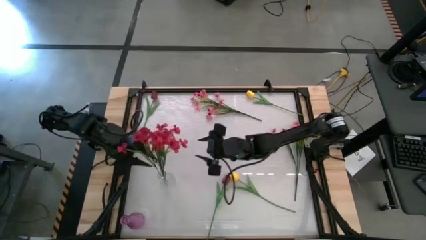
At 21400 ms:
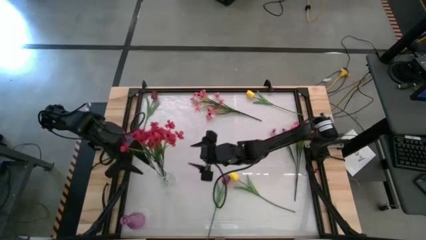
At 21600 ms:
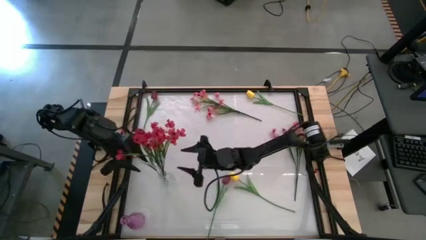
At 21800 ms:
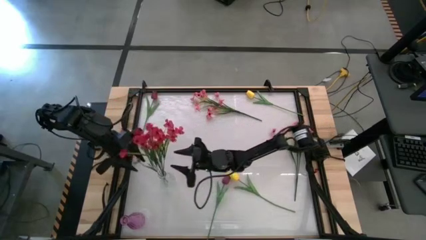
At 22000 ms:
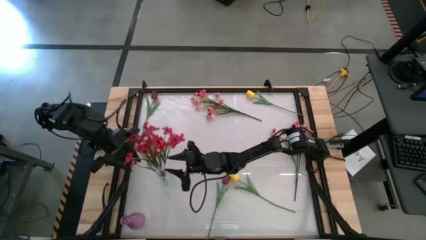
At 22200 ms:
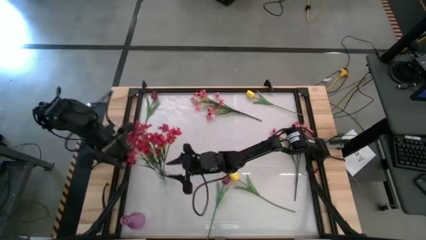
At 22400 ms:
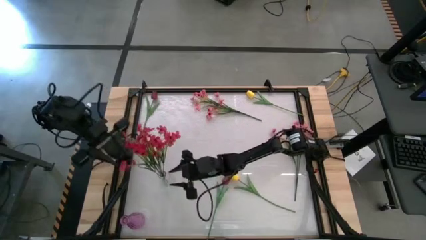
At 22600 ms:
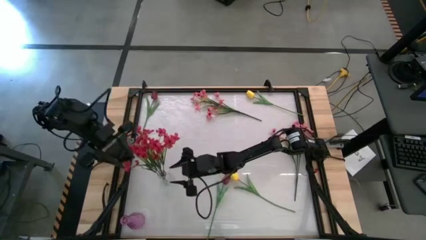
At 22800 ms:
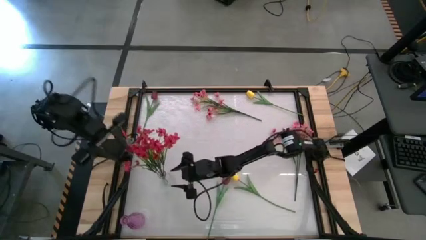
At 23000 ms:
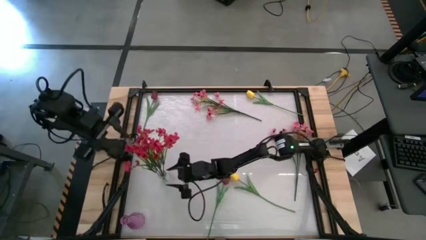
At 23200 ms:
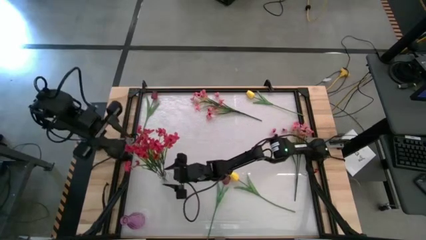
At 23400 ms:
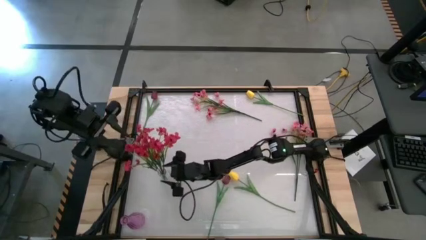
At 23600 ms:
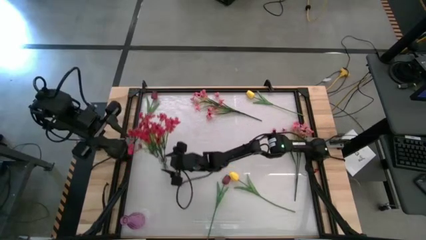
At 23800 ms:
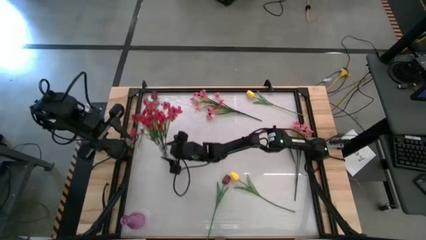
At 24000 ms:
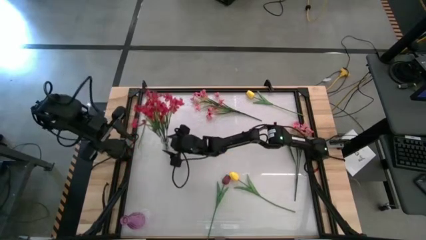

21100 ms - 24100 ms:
Task: Sort flowers into vase by color
Move the transparent vase to the middle left of the table

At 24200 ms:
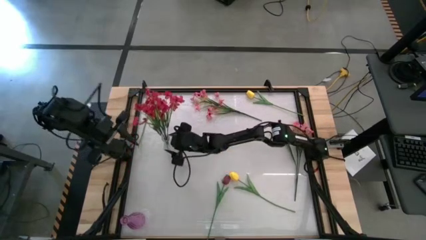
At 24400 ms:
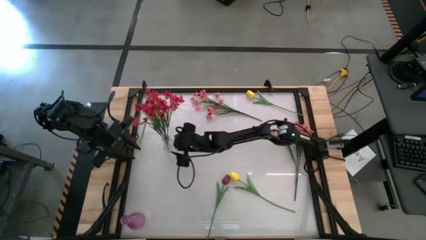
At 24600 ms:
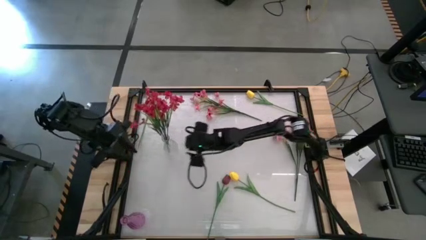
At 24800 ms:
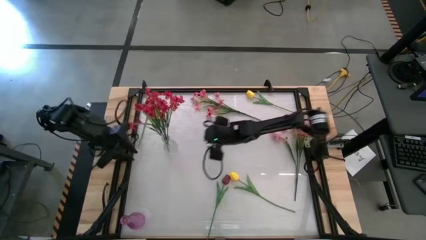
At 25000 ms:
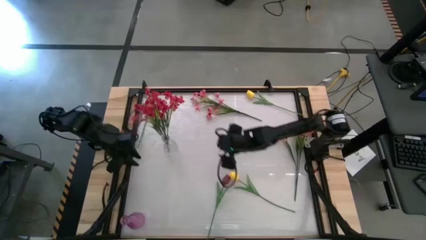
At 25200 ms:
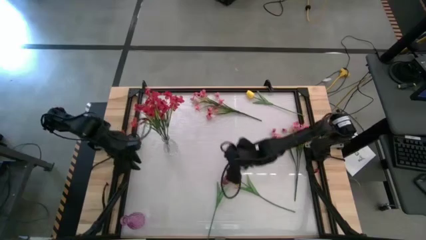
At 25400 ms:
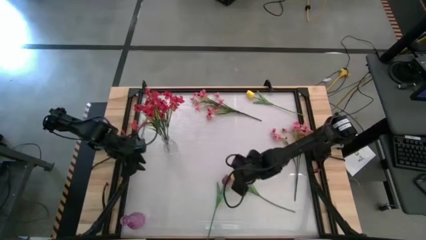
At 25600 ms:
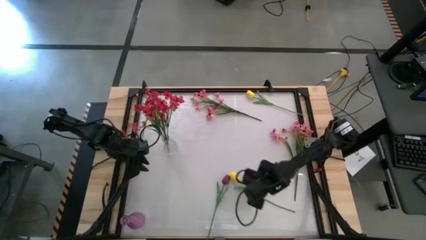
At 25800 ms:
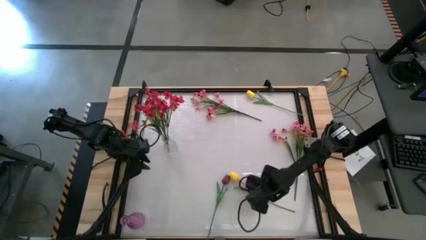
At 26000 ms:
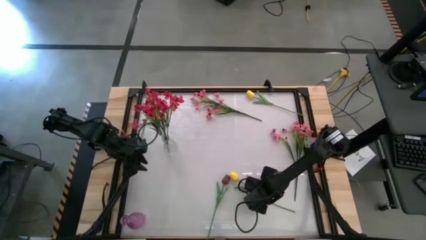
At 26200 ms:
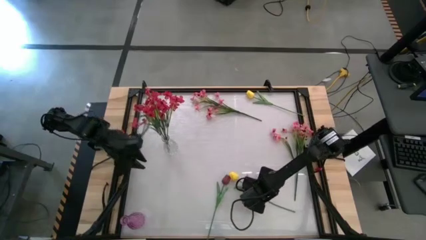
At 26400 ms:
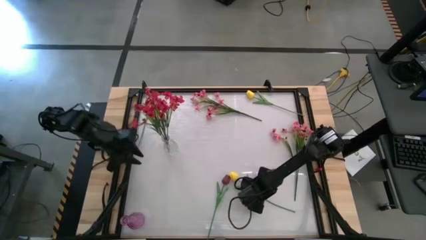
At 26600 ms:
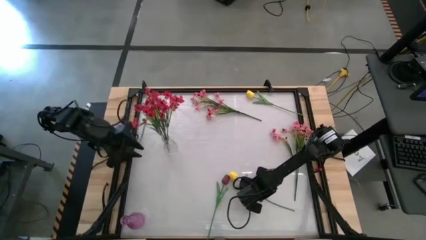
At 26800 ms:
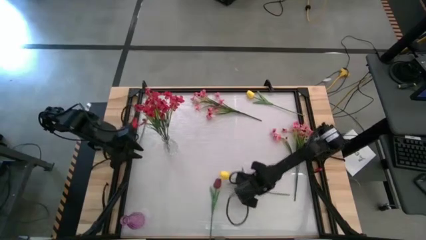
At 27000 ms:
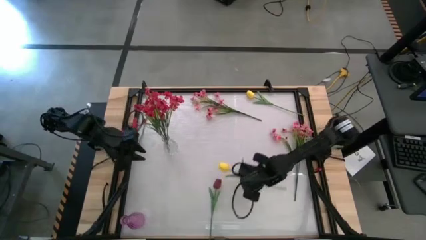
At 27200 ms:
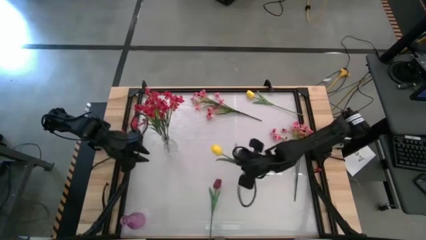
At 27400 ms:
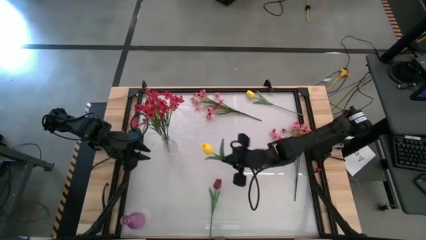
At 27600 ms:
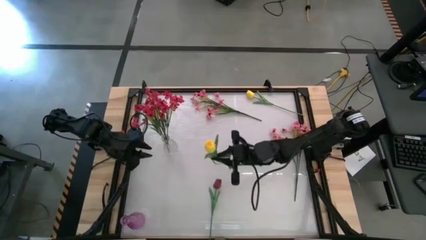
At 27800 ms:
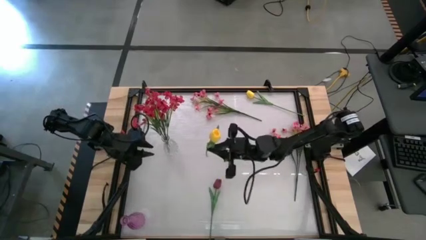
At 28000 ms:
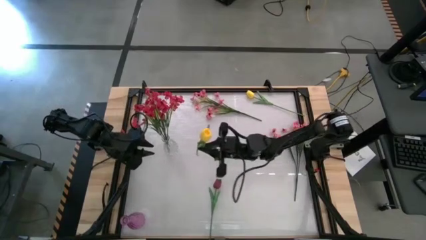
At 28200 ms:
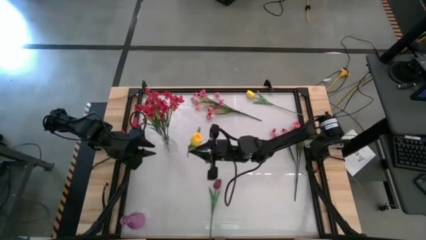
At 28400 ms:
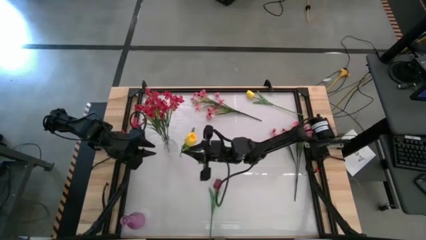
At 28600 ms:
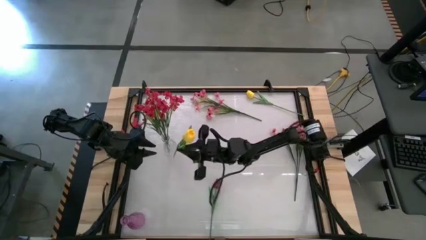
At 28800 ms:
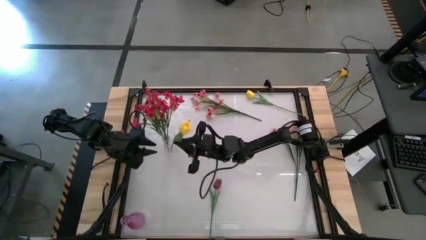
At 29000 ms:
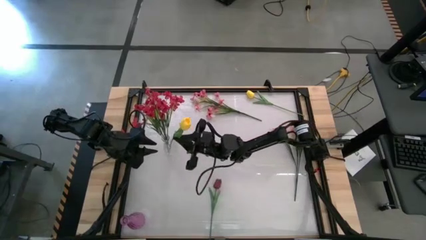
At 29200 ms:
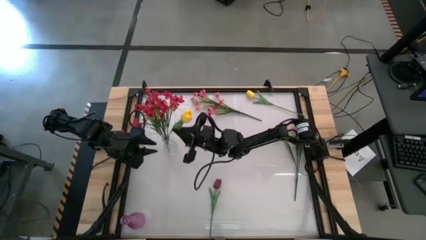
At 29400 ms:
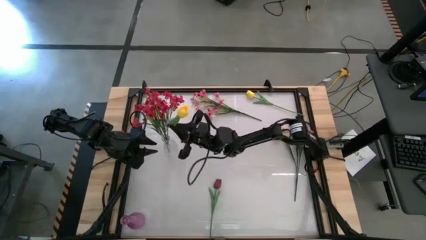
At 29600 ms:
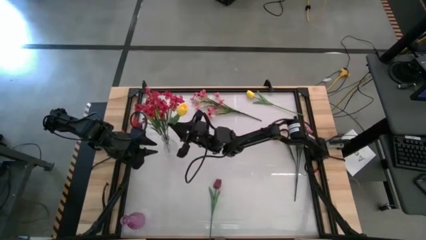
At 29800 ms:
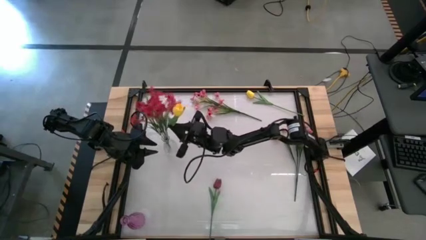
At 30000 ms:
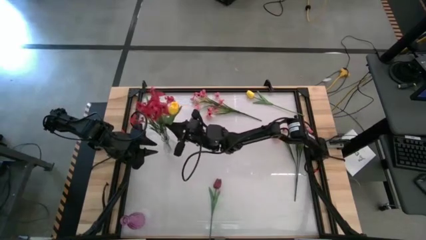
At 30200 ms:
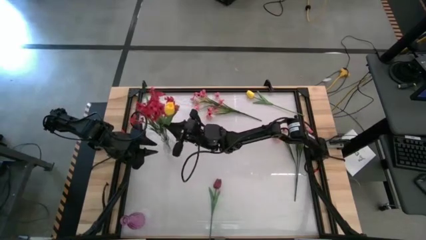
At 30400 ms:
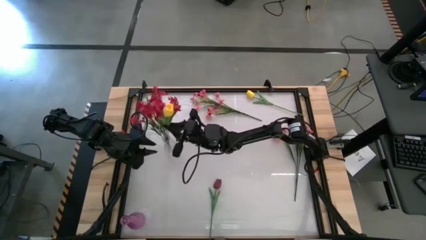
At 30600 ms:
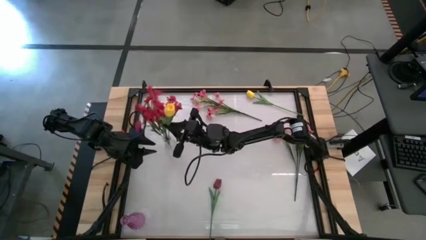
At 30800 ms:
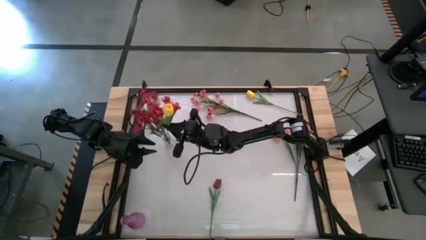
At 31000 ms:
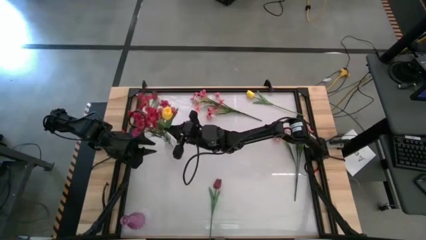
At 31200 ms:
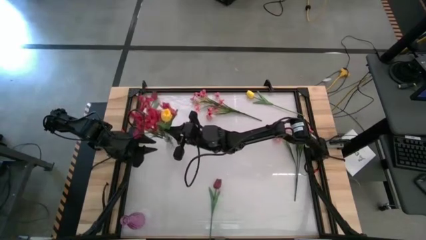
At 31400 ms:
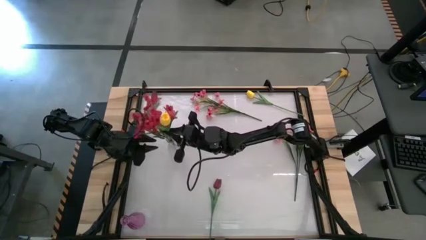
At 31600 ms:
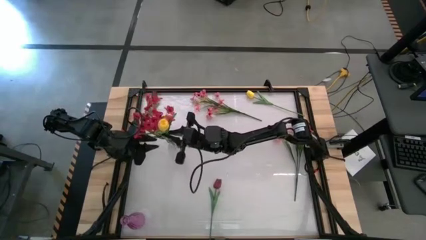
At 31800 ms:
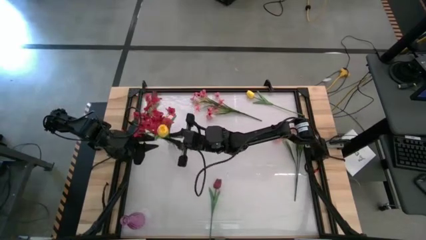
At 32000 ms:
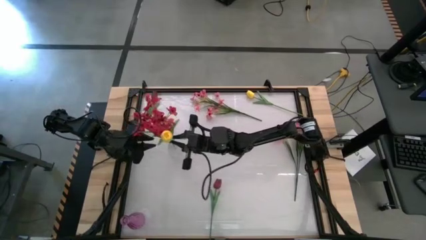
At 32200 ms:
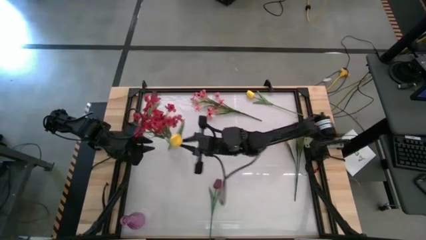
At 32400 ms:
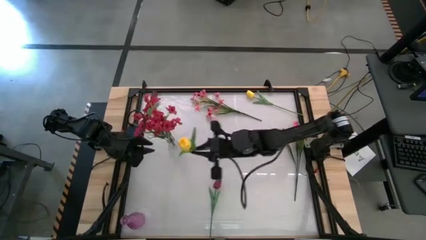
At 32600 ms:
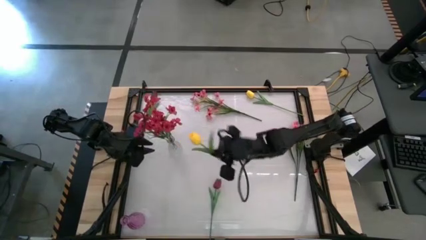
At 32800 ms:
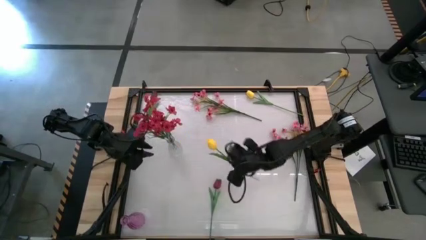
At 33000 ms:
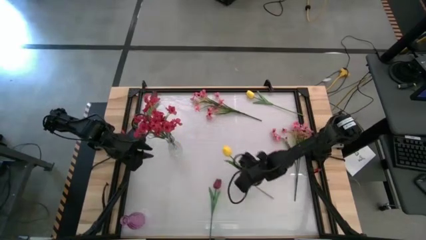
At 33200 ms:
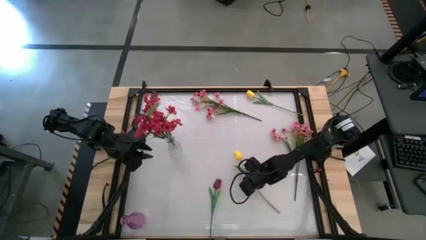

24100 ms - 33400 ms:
Put the bottom yellow flower into the transparent vase

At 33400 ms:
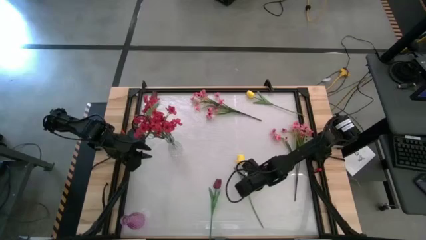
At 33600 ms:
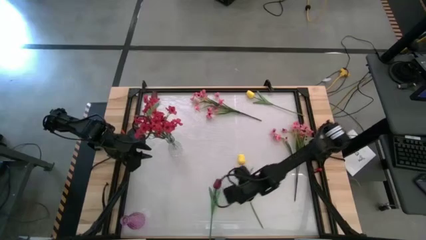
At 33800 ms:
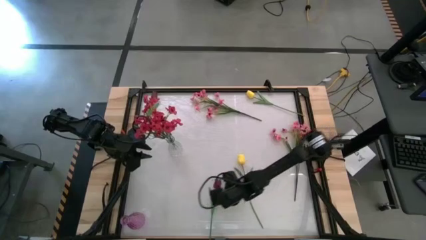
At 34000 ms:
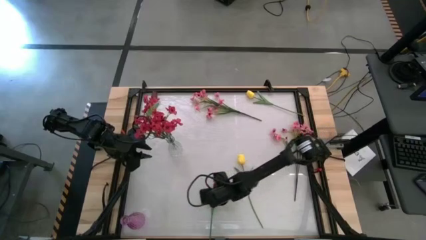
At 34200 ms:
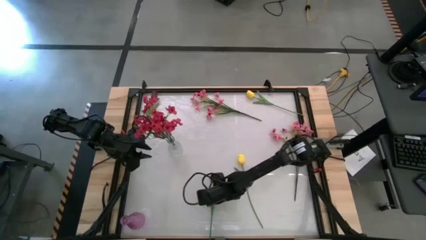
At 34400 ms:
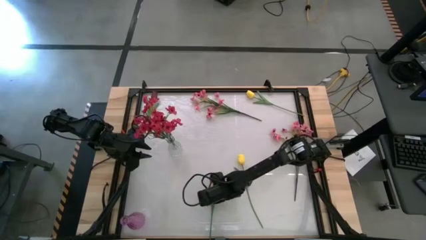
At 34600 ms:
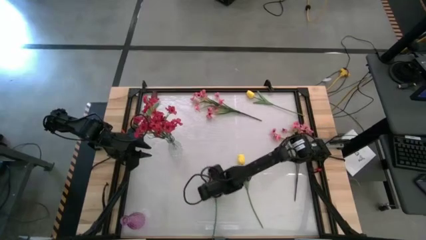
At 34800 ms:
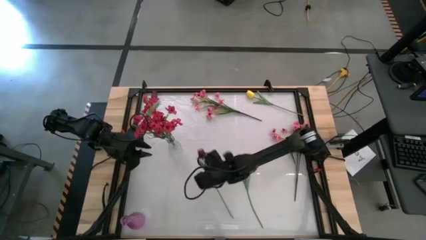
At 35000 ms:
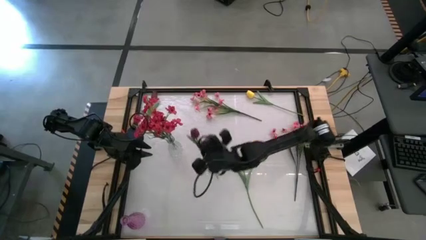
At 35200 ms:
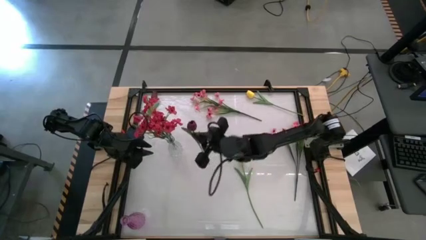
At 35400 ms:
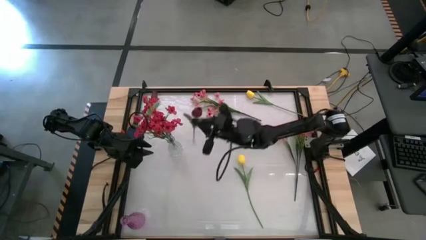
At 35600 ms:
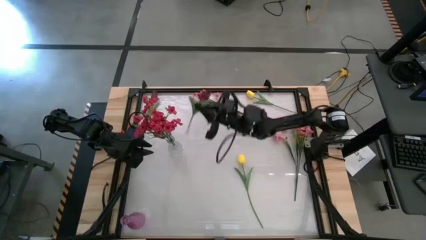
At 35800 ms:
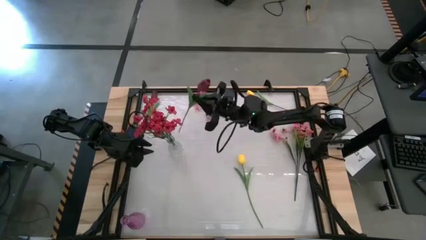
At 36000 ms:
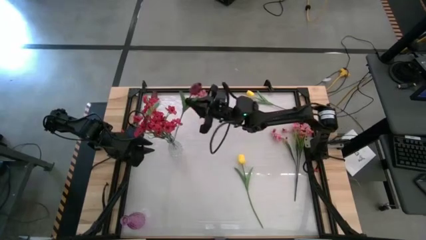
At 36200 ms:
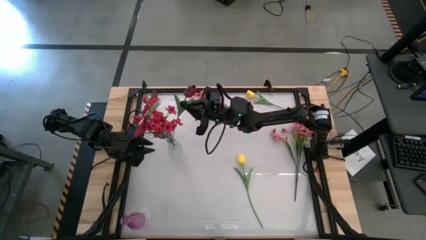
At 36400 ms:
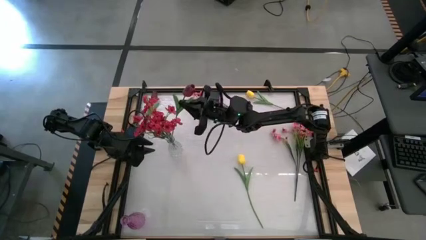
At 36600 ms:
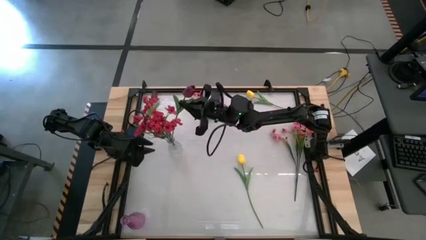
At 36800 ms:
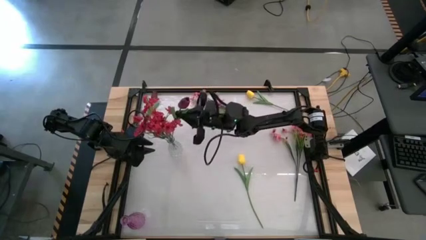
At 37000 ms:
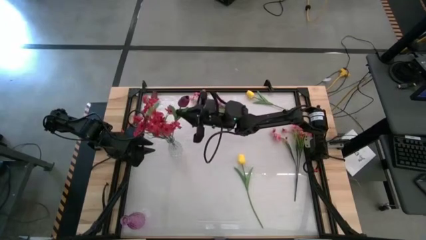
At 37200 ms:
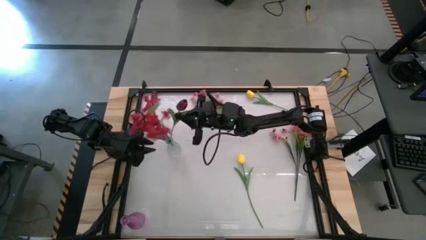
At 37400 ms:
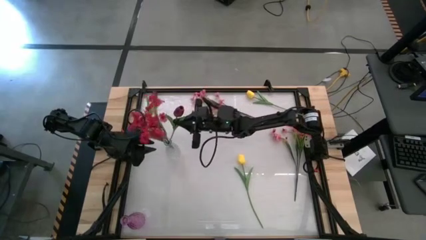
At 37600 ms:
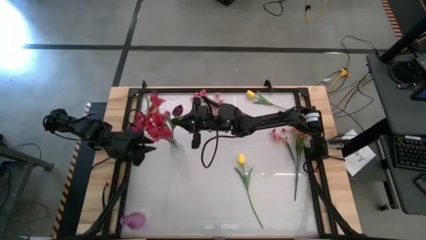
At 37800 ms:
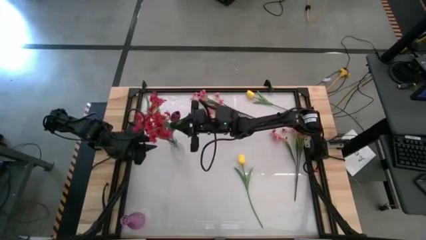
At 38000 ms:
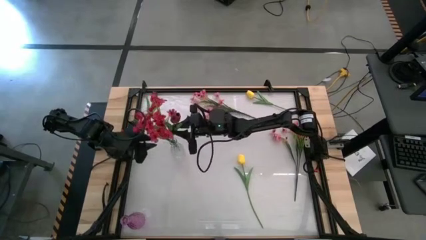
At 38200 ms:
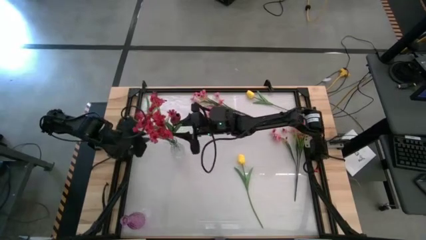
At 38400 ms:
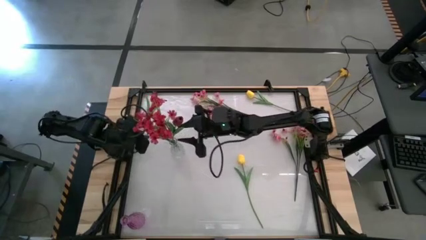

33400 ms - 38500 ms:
Put the bottom red flower into the transparent vase
